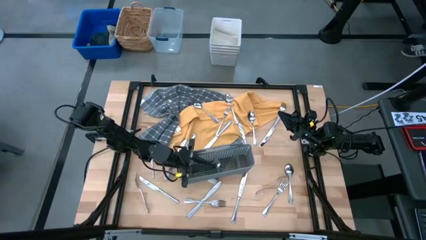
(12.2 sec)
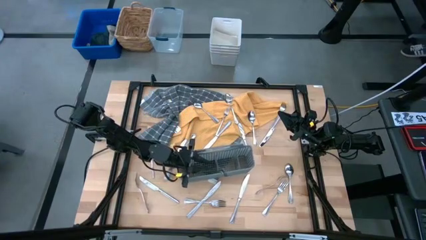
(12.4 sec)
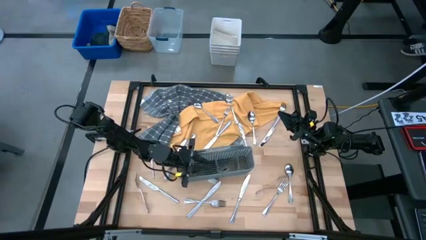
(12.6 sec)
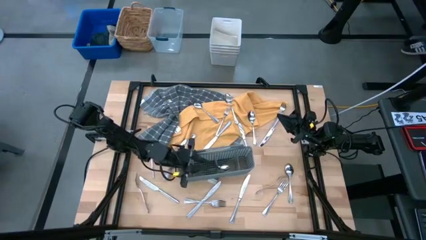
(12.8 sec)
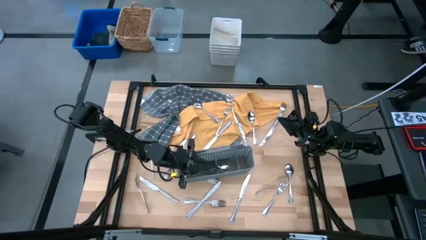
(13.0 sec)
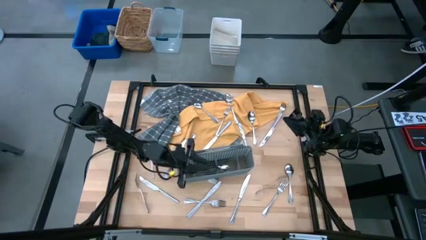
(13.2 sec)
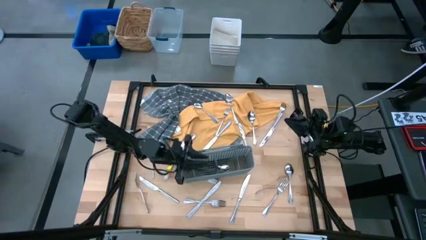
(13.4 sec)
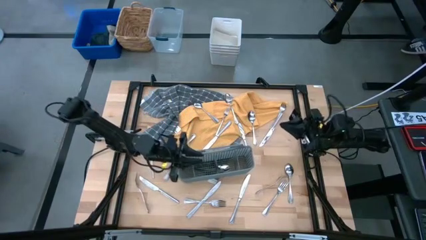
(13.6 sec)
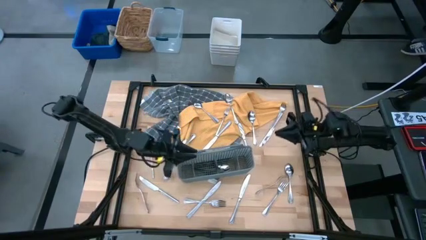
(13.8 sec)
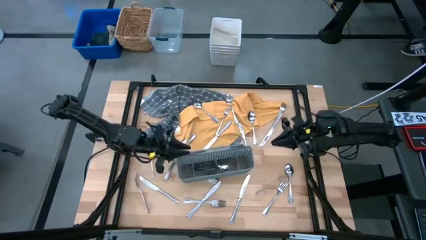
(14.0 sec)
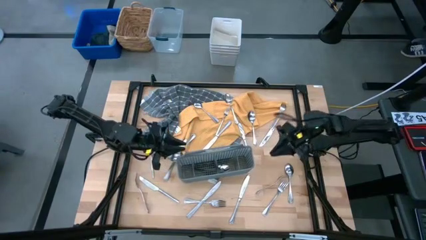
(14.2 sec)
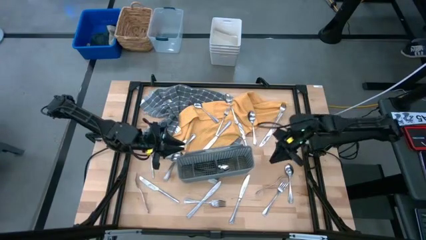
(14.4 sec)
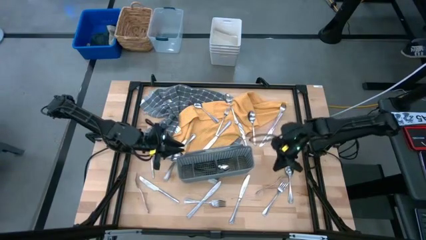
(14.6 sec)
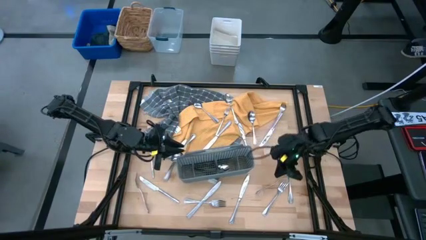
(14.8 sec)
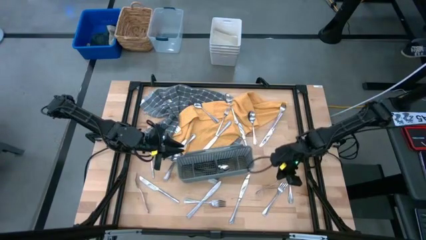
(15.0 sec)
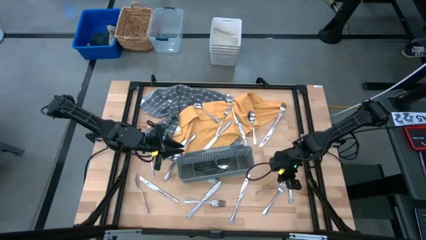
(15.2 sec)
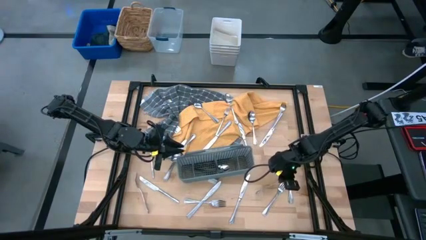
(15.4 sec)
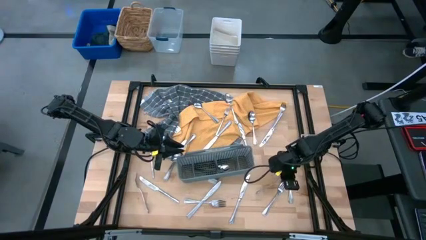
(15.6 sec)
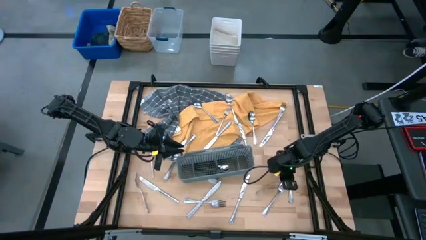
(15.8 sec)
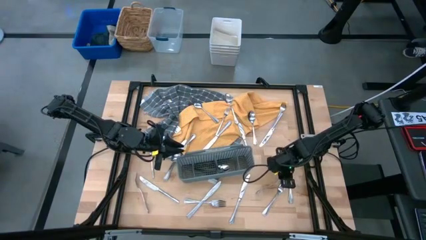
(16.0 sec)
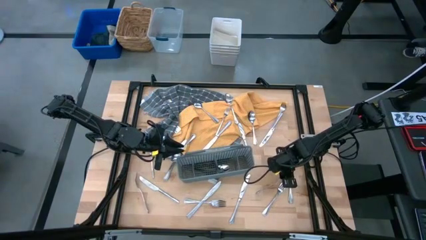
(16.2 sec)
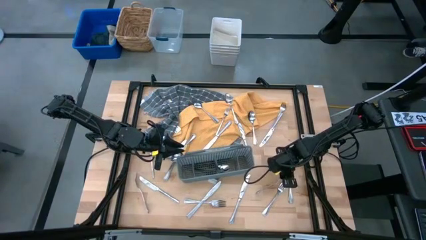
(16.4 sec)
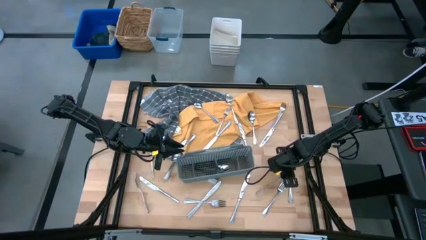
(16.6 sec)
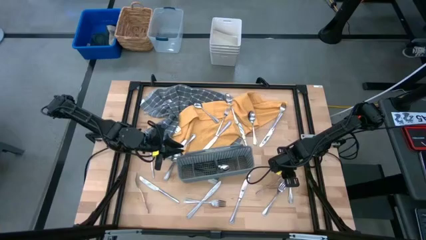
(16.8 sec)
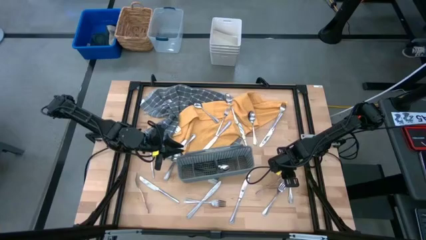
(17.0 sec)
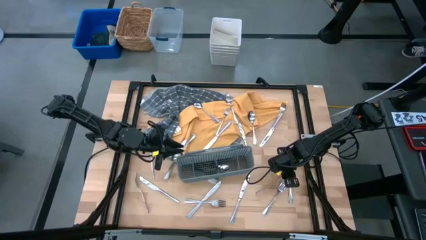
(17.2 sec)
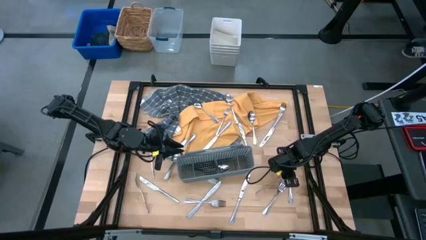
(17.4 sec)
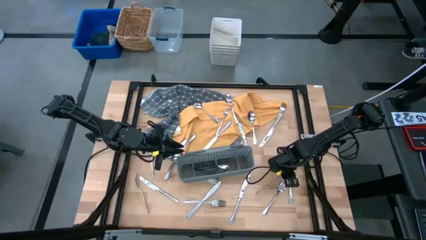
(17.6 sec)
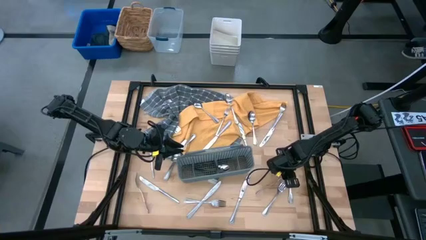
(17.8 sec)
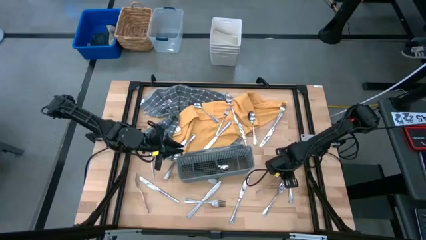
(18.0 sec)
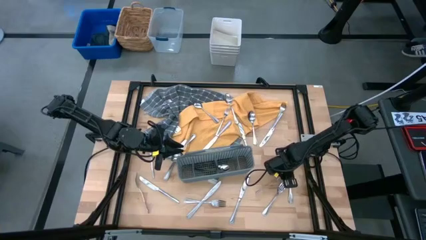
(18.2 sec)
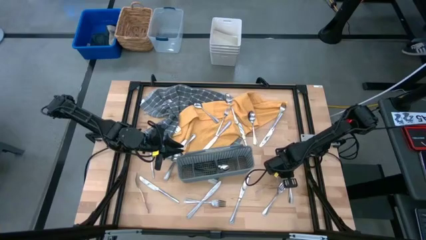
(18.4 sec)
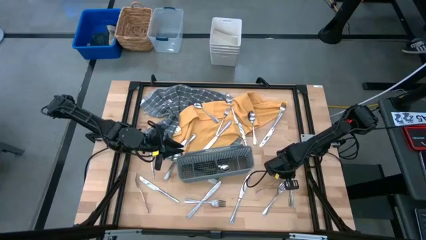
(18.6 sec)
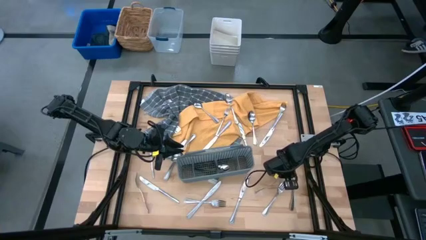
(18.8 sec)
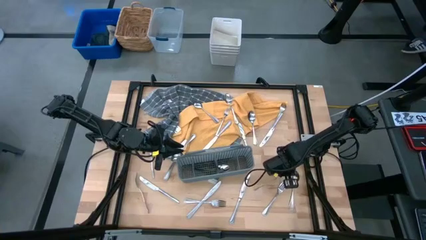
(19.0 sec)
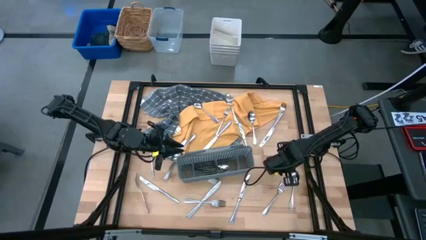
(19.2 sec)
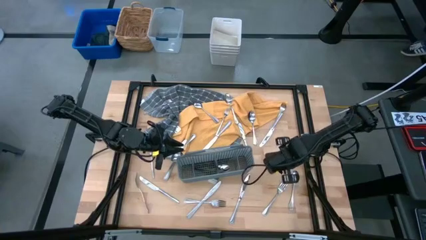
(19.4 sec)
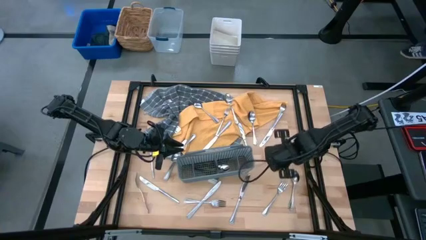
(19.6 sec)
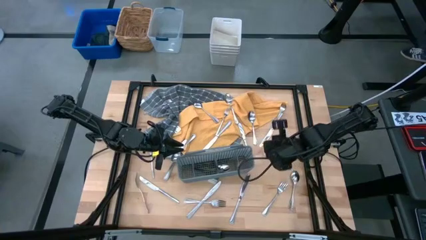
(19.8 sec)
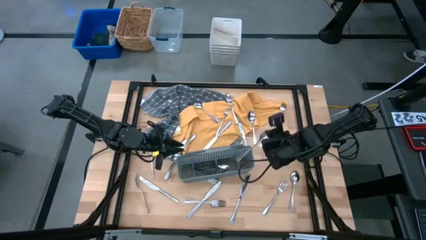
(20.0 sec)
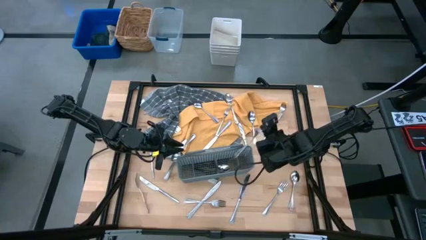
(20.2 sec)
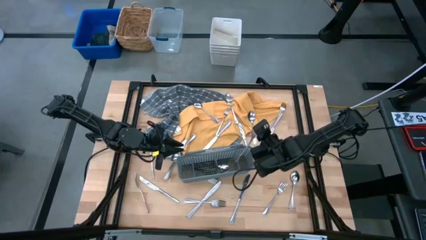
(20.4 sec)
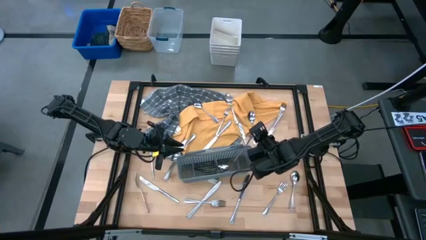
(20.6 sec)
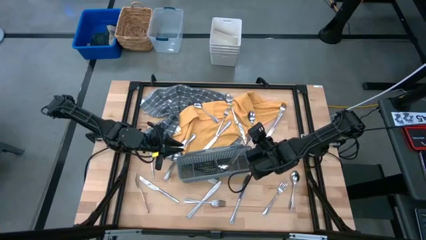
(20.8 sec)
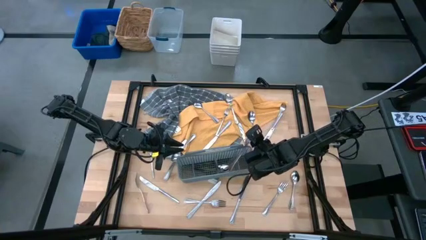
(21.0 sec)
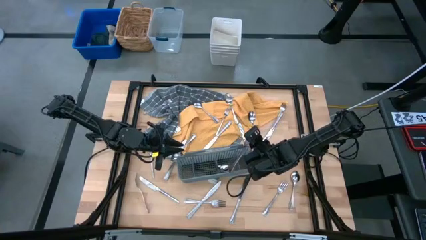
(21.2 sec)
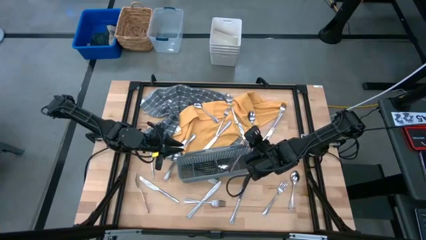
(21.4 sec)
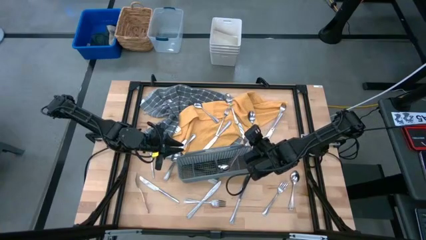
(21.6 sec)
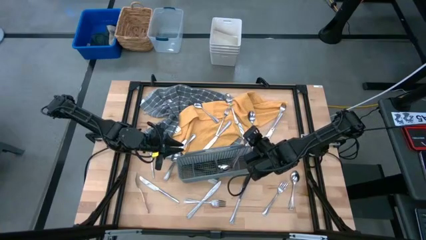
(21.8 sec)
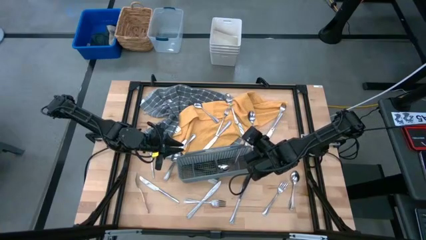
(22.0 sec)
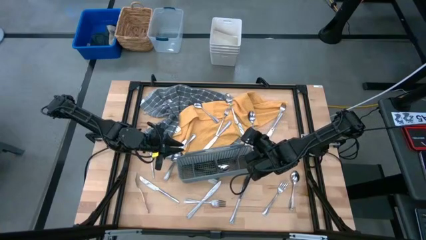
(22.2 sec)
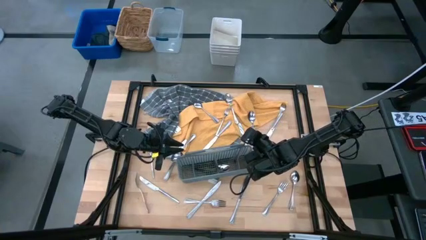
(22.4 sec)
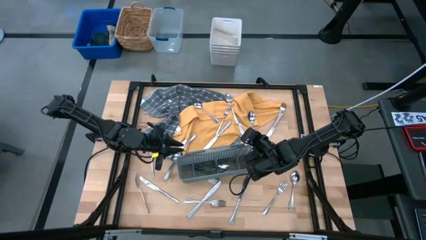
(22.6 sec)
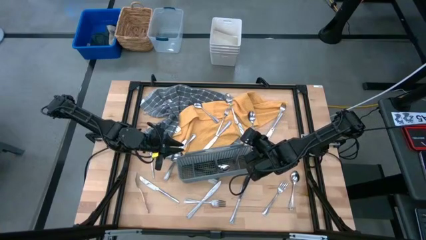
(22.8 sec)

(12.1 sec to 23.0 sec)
Task: Sort silverware
Put the silver fork into the gray silverware basket
